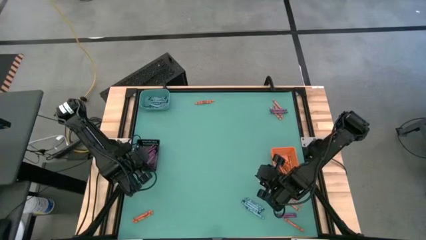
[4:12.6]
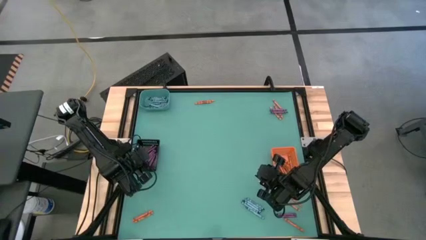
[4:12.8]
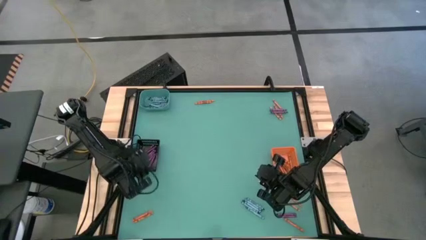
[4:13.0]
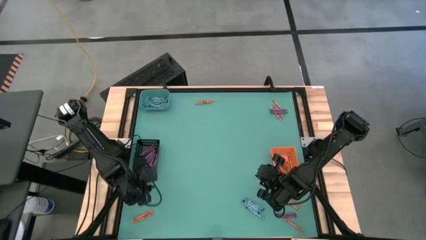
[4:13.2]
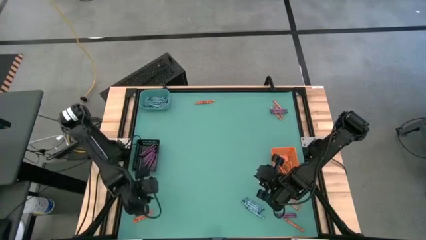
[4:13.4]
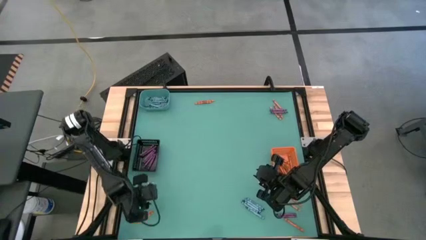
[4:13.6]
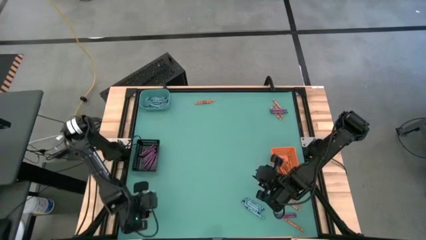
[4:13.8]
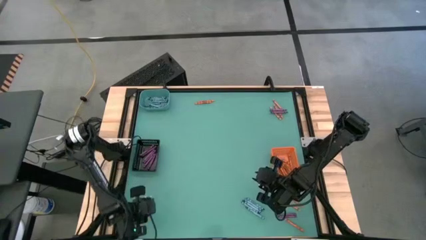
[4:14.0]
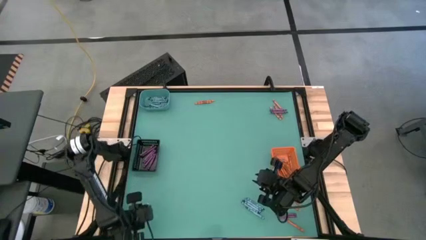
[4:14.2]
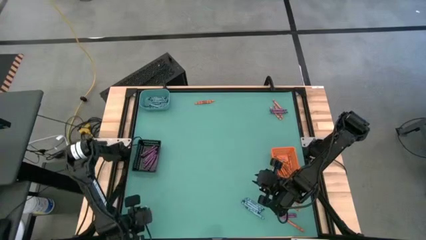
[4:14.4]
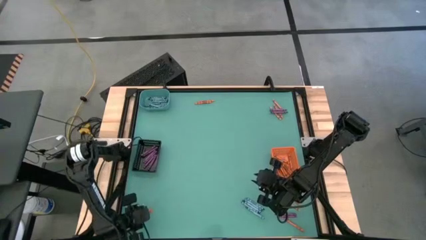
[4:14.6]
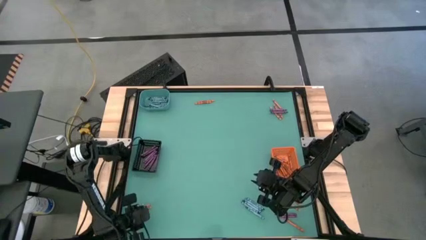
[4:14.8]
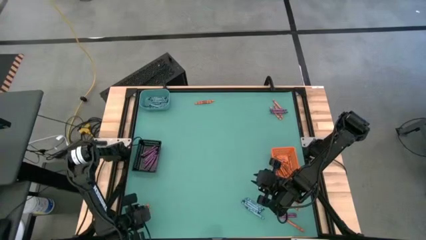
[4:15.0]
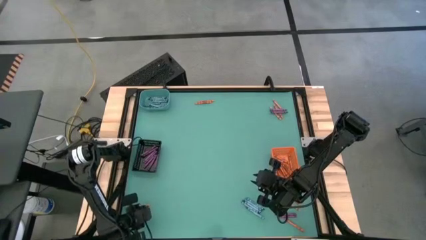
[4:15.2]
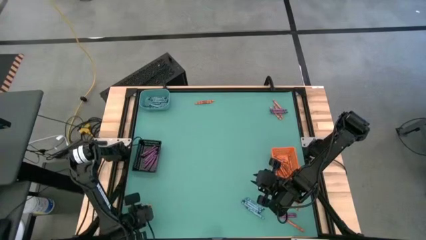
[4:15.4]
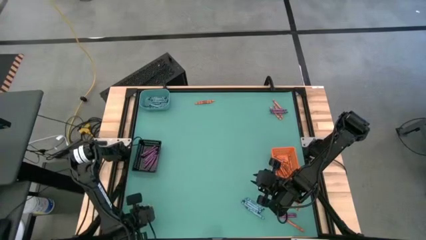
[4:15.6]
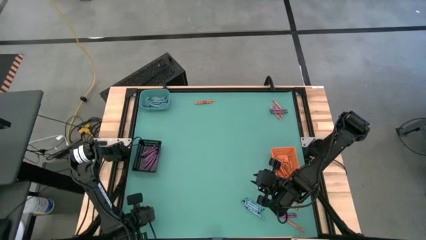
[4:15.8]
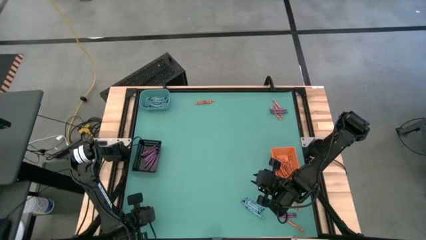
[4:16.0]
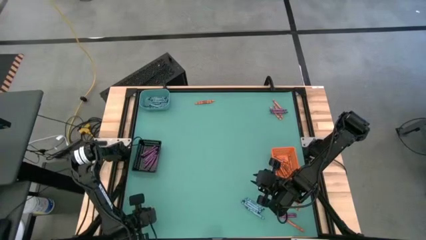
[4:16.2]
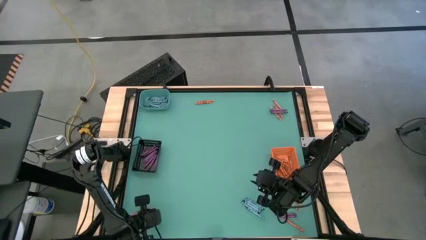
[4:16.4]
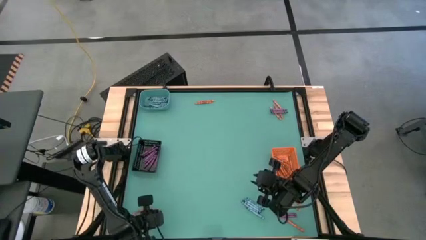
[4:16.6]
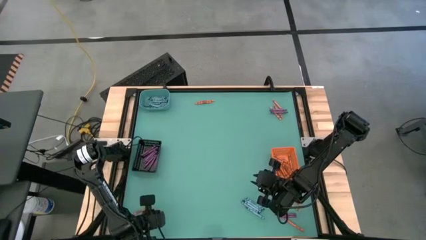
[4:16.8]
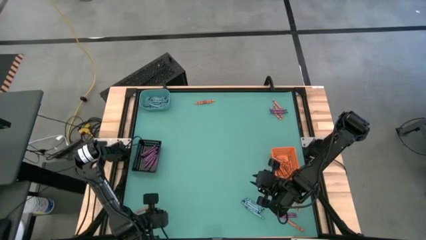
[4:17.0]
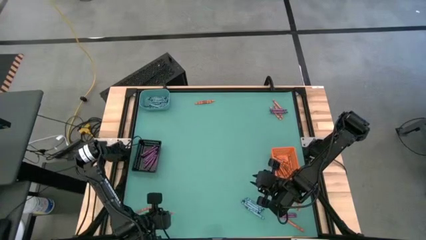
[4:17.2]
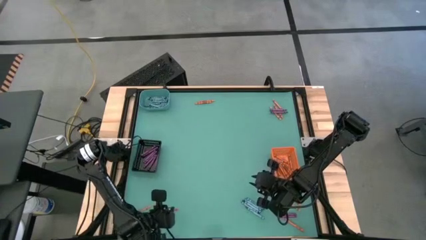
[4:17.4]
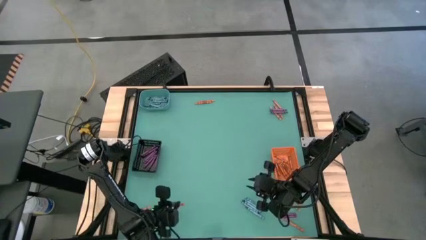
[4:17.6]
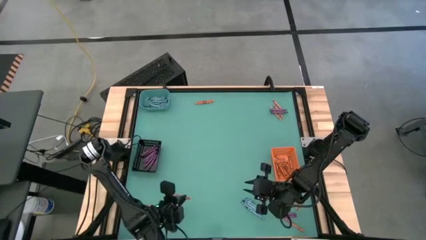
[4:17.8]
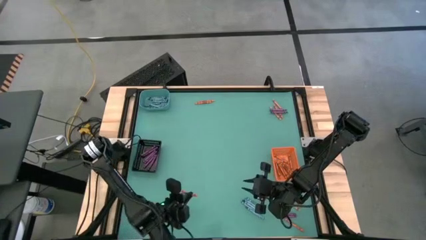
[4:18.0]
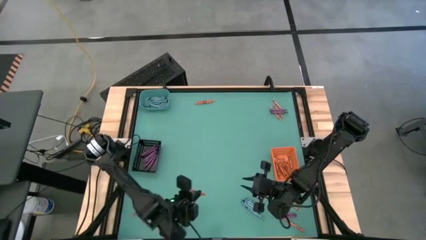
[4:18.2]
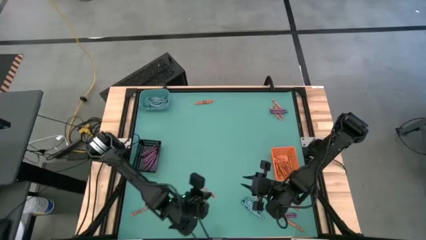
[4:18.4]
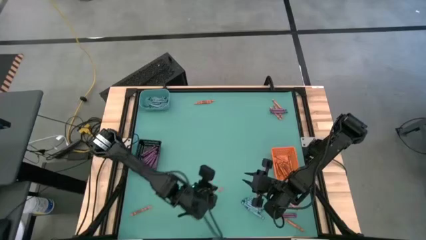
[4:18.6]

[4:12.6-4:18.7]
Task: Sort crayons
Put the orange crayon into the orange bin

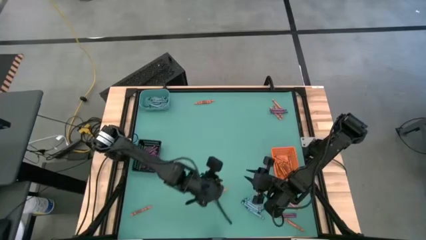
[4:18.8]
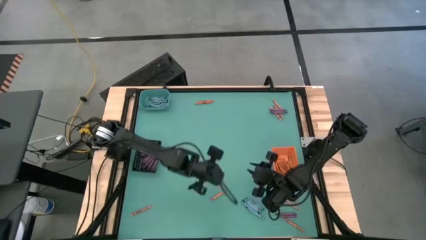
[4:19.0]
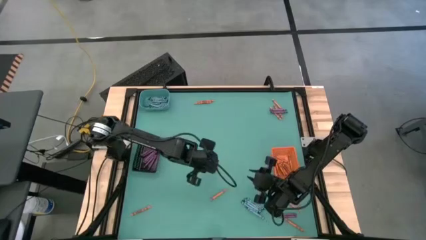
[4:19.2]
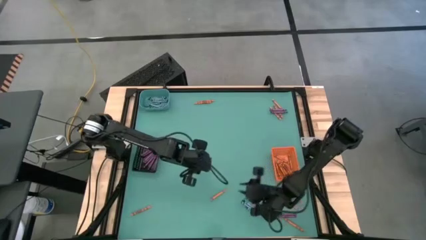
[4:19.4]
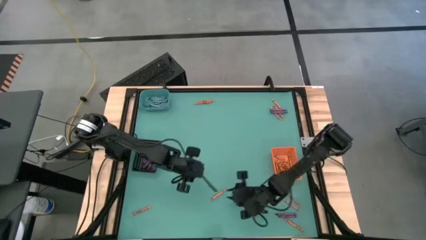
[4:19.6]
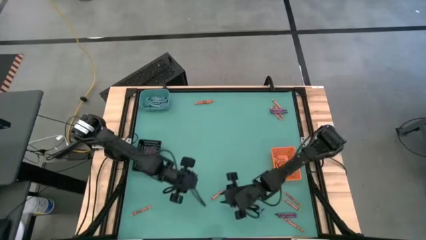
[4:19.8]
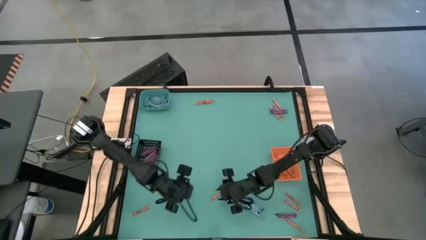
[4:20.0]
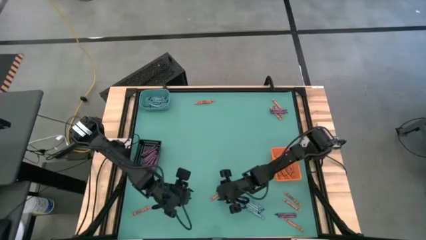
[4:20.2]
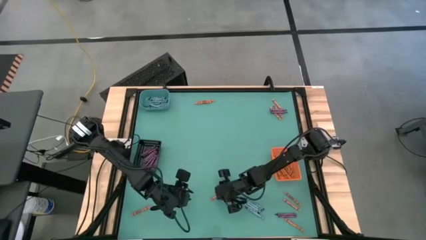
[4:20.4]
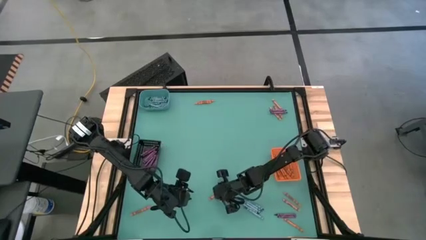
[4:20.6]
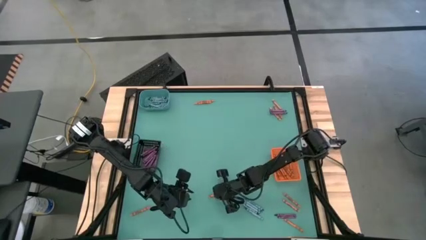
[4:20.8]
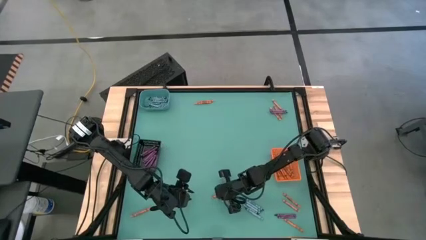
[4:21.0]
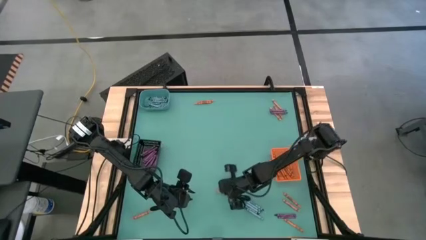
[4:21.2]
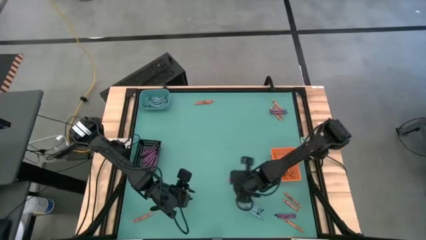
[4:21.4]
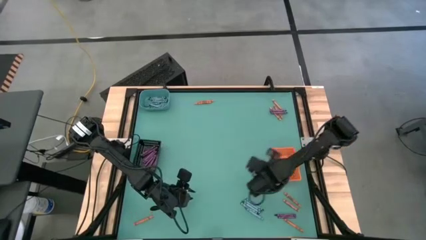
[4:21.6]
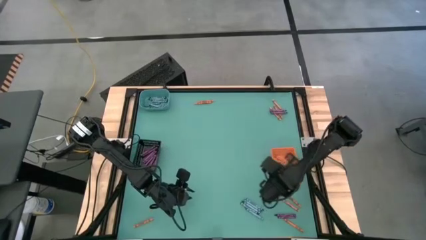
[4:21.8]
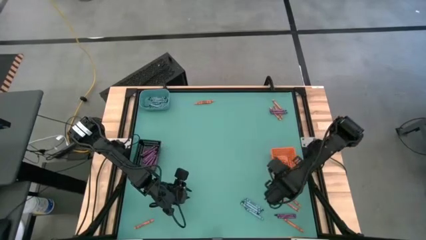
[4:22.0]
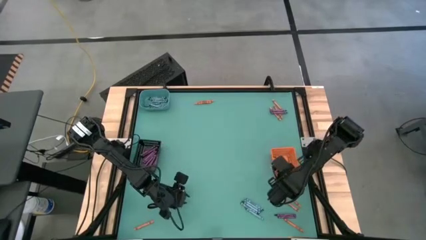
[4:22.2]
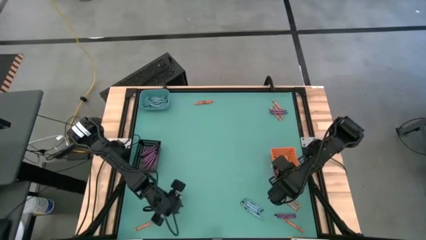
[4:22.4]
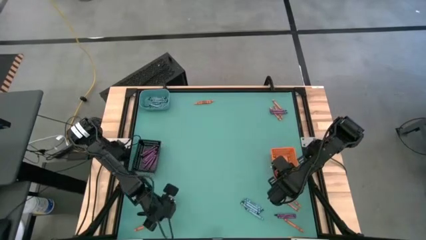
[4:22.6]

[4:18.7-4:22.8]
Put the orange crayon into the orange bin

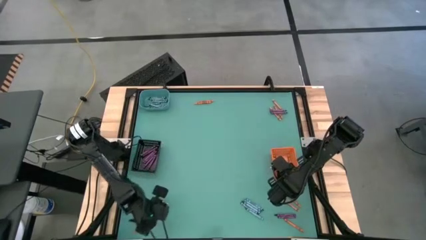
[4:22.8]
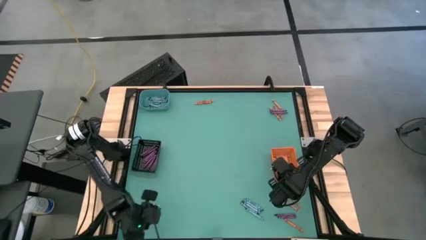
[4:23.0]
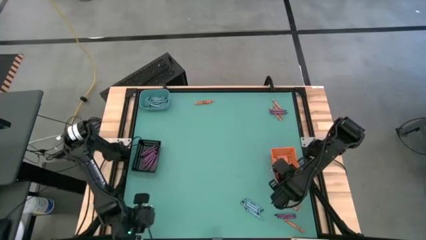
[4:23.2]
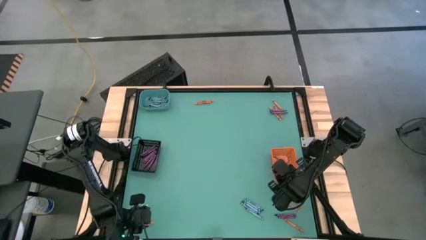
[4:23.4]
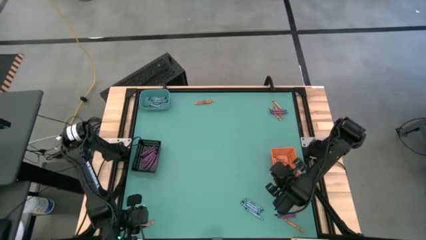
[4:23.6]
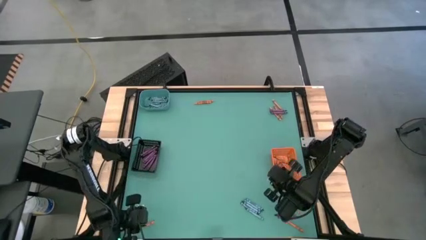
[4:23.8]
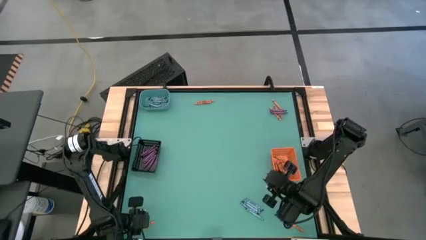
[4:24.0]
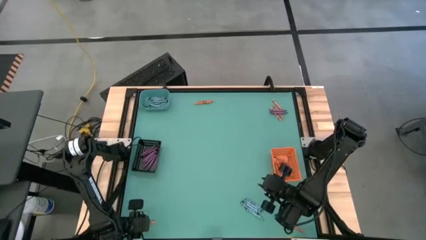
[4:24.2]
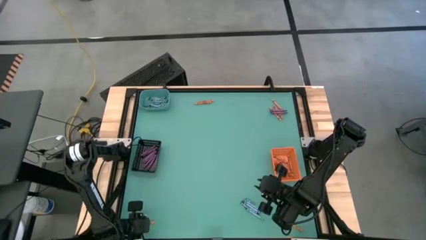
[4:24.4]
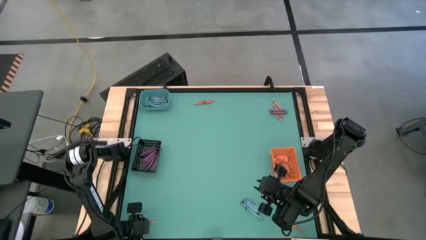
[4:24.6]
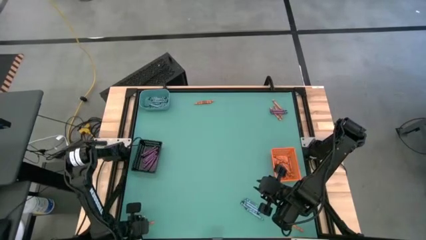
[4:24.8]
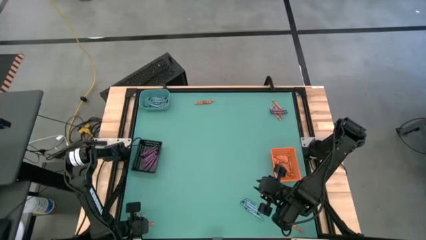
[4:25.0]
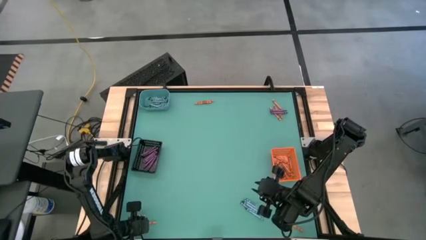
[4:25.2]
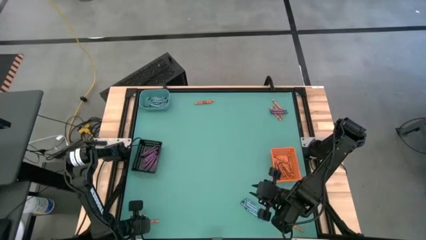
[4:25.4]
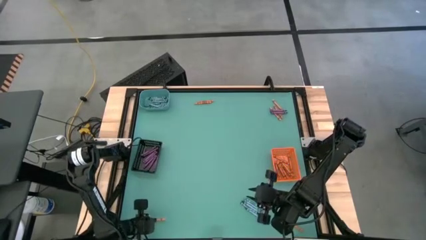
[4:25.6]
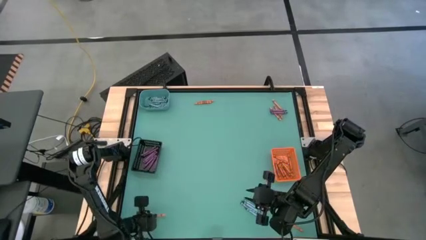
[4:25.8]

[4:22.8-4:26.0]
Put the orange crayon into the orange bin

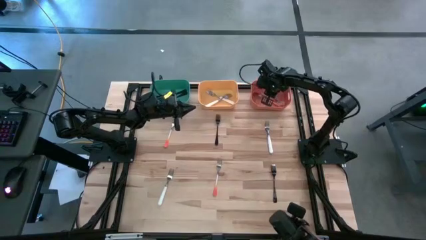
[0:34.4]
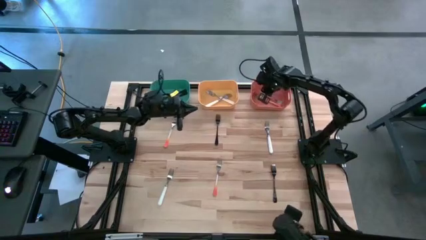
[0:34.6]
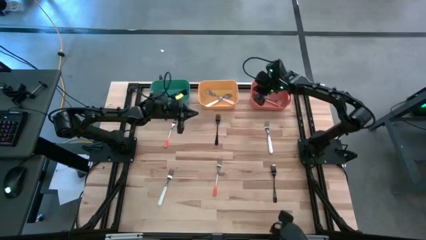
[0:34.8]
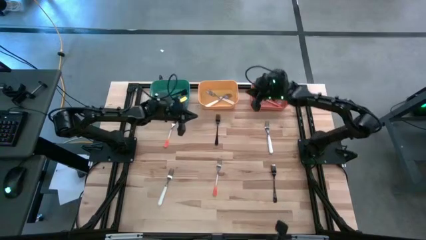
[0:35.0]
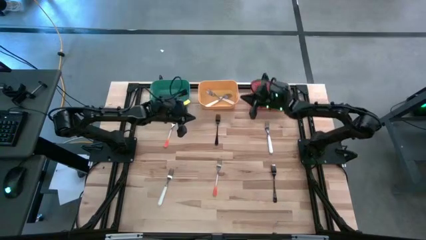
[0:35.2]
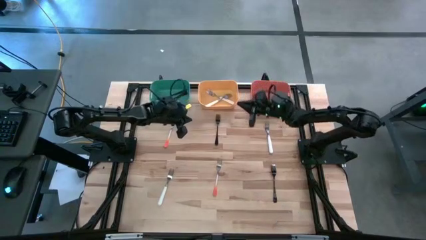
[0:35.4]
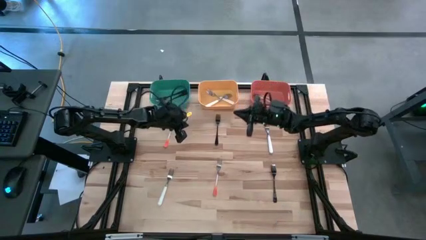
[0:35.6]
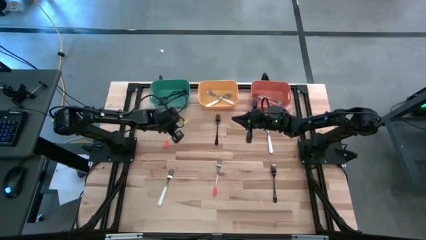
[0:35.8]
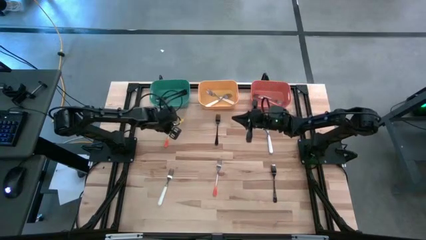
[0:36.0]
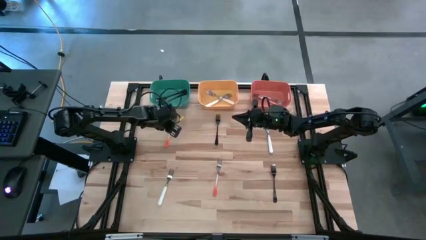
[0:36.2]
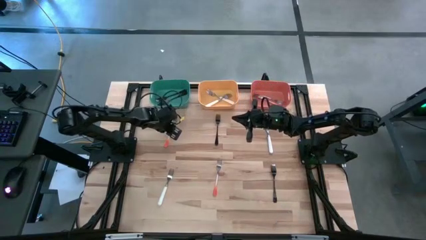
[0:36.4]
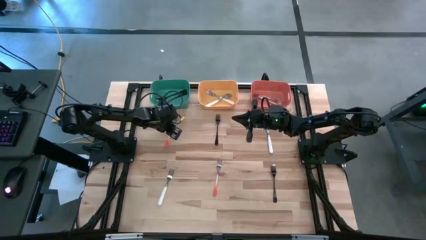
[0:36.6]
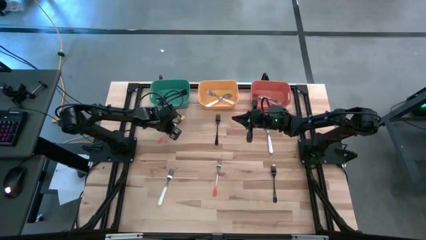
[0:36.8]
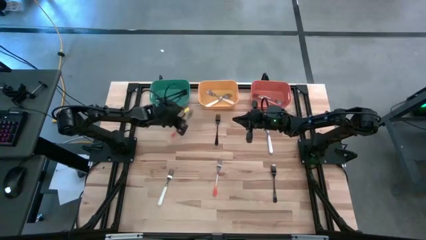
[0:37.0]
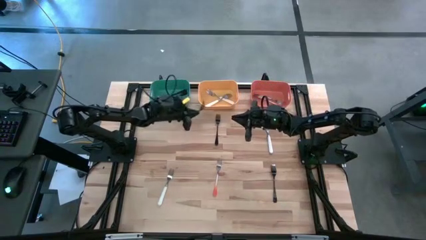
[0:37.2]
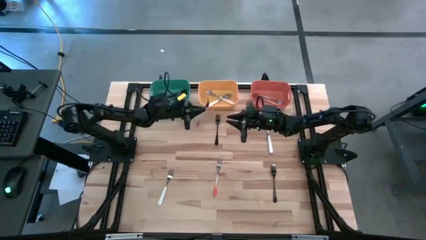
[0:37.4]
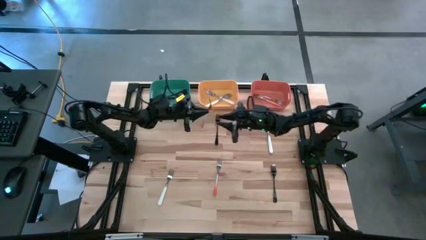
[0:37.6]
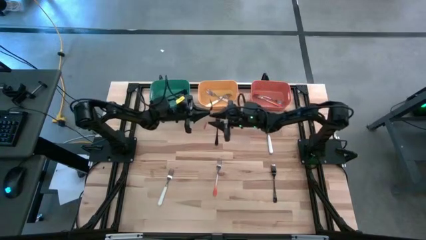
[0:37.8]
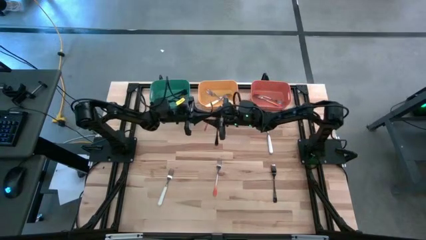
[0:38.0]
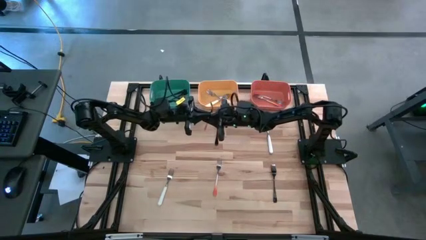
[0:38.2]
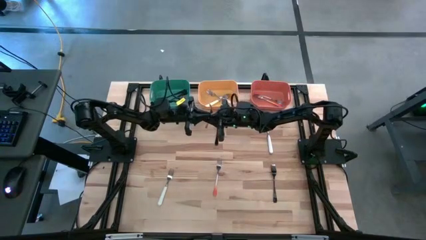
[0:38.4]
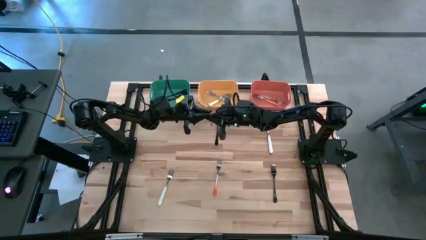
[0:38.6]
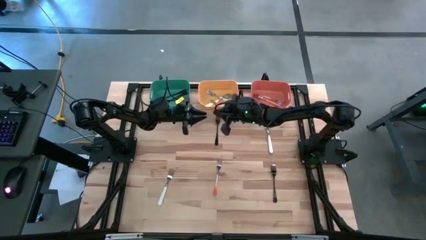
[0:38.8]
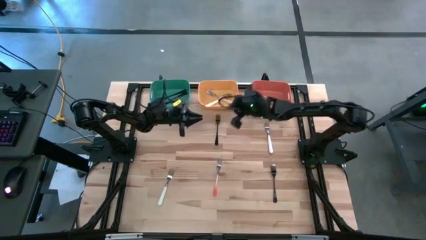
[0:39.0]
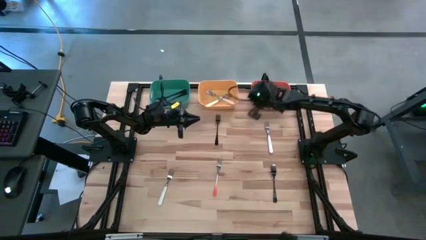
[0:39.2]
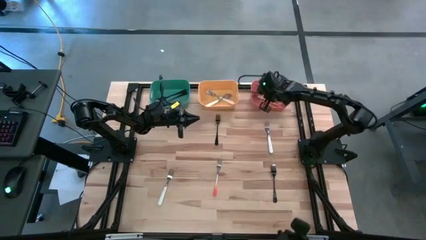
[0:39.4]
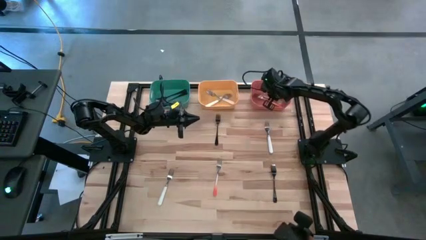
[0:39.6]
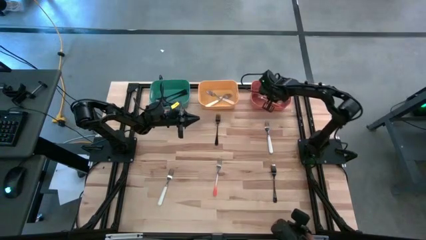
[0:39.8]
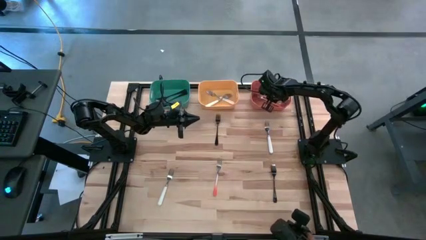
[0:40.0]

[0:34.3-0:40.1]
Task: Sort silverware by color (type)
Put the orange fork into the orange bin
